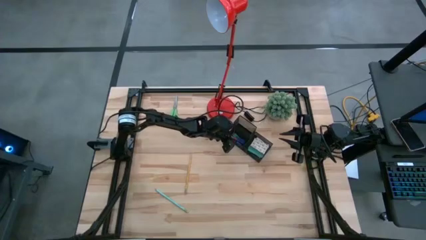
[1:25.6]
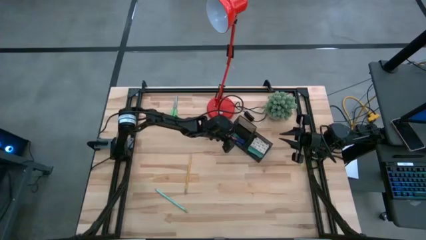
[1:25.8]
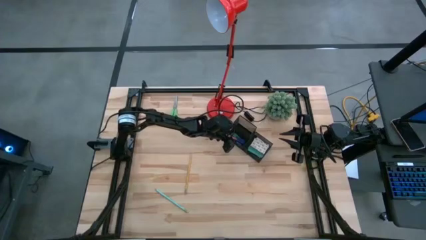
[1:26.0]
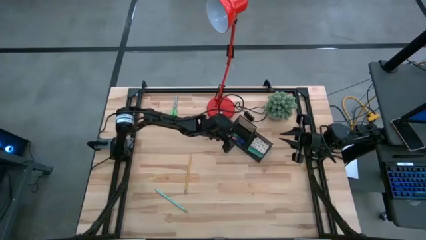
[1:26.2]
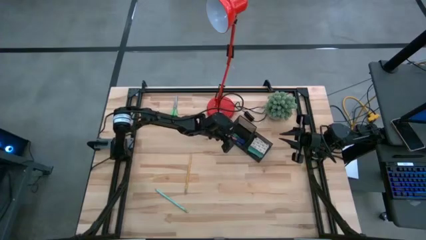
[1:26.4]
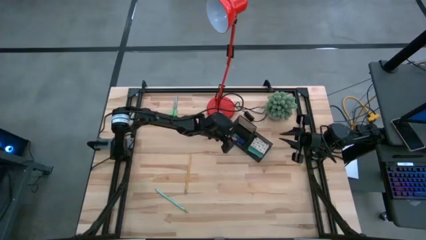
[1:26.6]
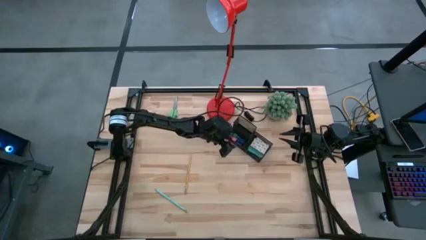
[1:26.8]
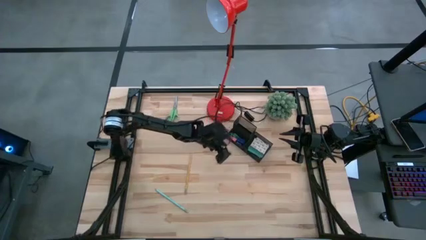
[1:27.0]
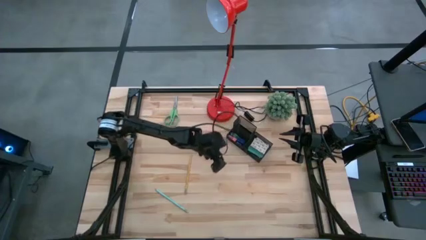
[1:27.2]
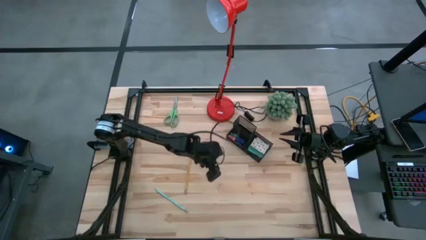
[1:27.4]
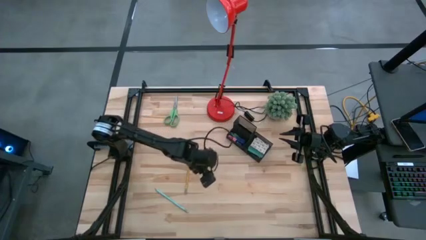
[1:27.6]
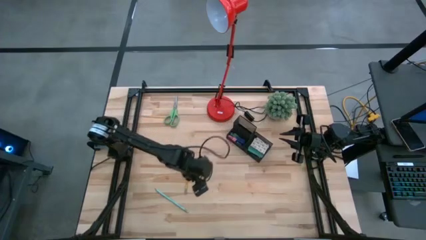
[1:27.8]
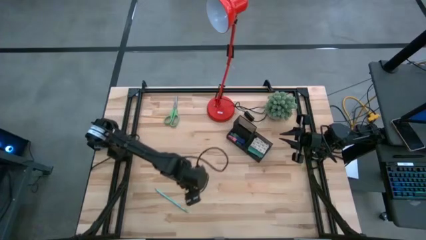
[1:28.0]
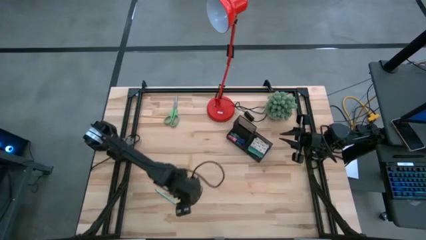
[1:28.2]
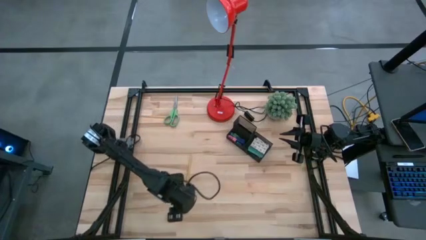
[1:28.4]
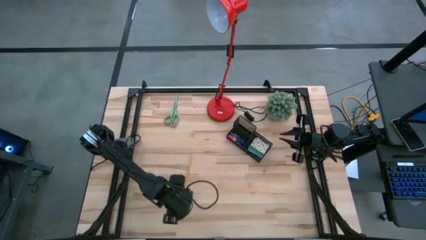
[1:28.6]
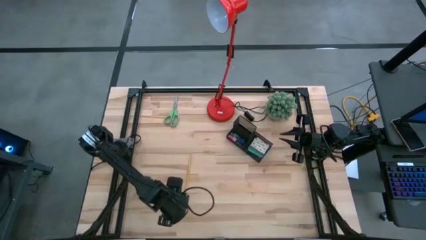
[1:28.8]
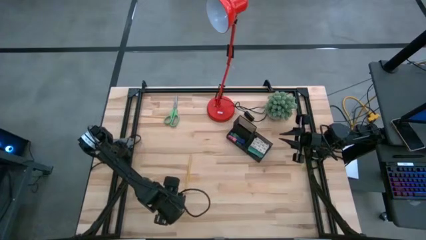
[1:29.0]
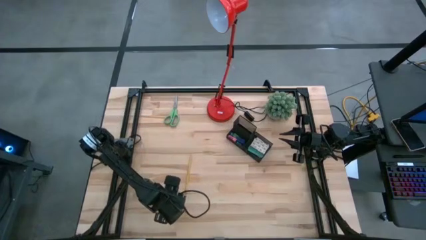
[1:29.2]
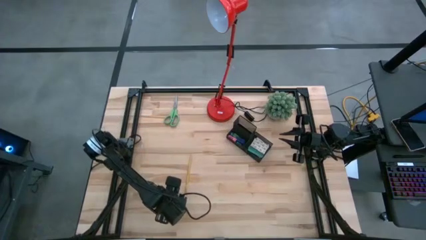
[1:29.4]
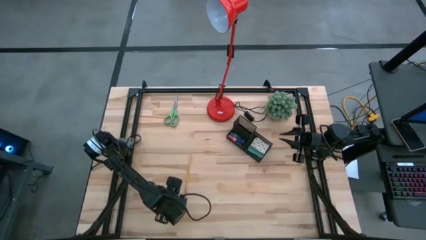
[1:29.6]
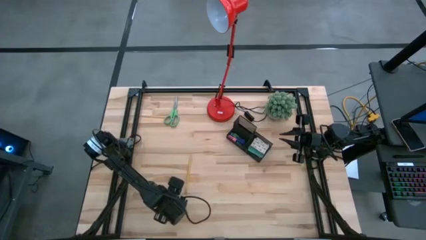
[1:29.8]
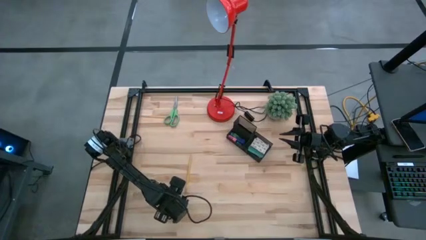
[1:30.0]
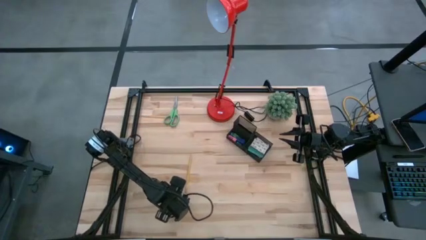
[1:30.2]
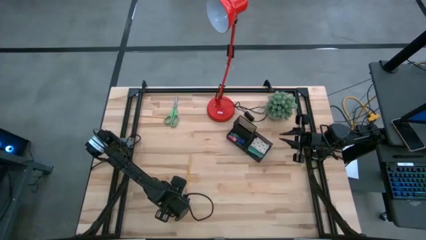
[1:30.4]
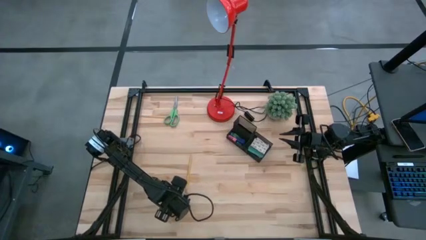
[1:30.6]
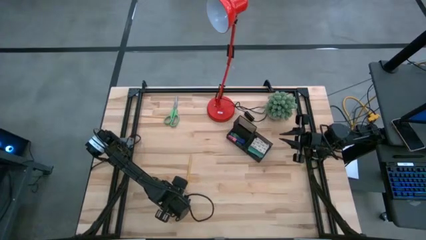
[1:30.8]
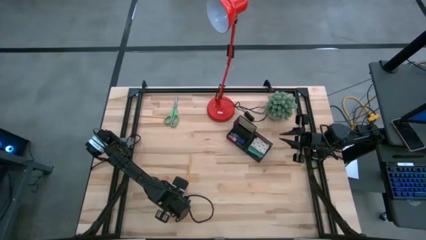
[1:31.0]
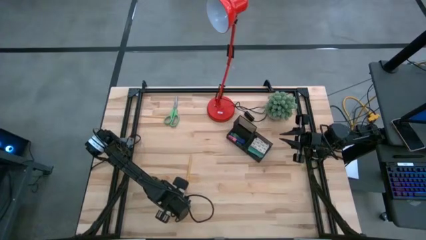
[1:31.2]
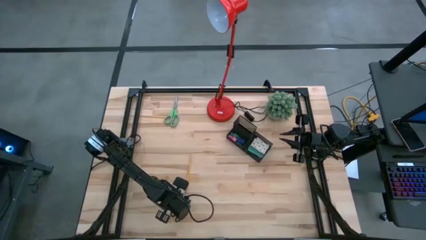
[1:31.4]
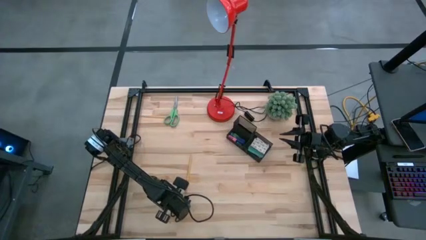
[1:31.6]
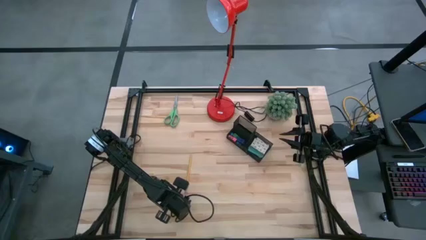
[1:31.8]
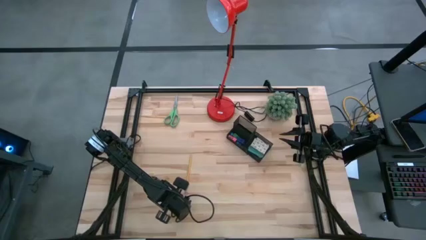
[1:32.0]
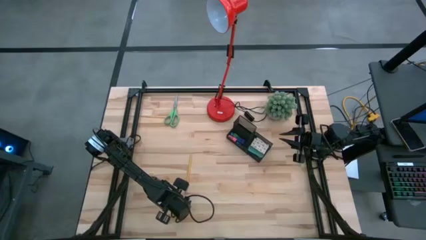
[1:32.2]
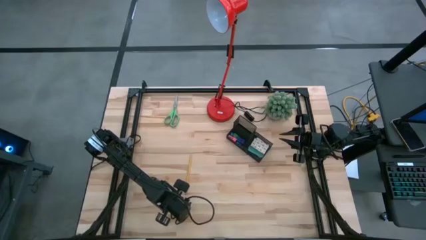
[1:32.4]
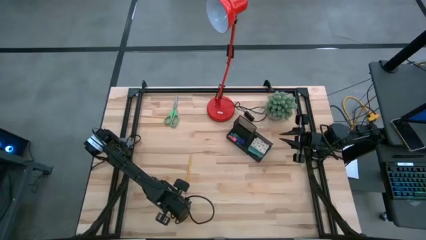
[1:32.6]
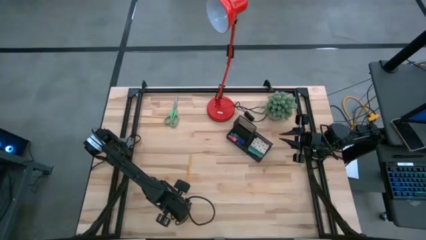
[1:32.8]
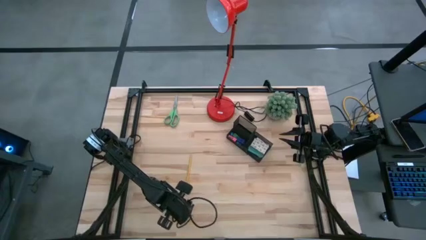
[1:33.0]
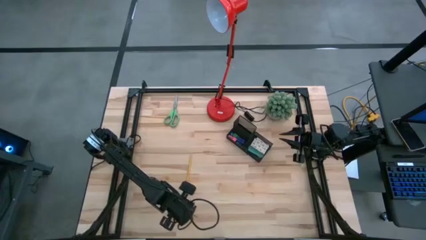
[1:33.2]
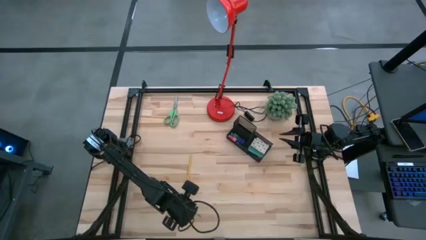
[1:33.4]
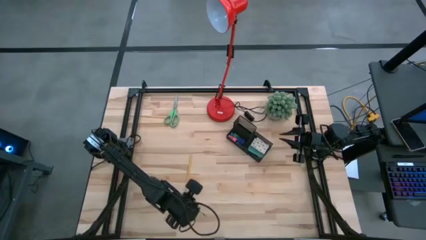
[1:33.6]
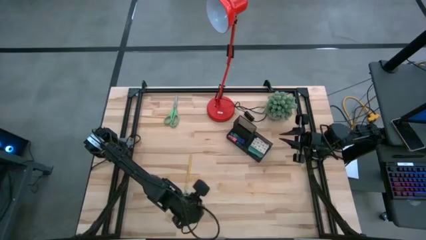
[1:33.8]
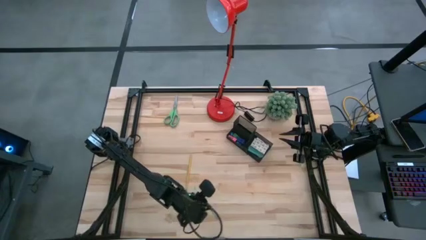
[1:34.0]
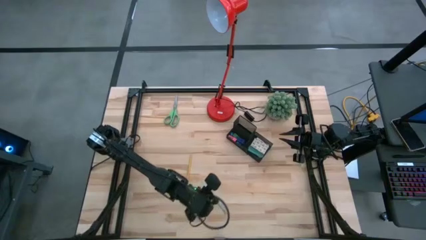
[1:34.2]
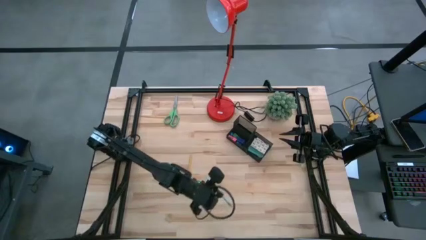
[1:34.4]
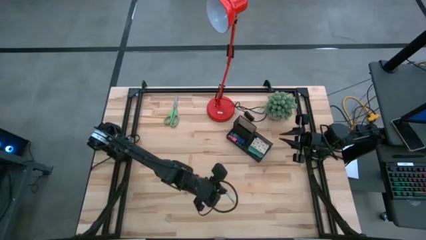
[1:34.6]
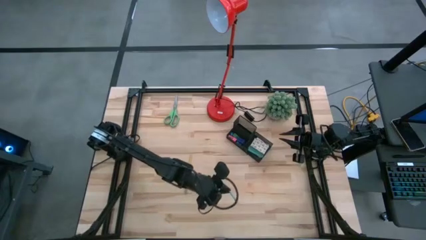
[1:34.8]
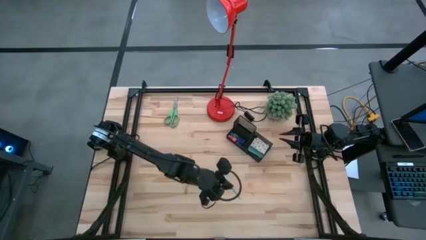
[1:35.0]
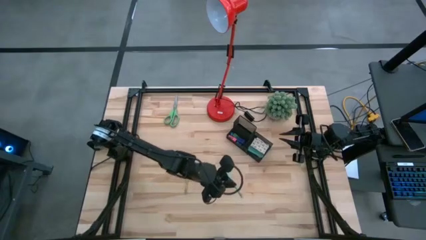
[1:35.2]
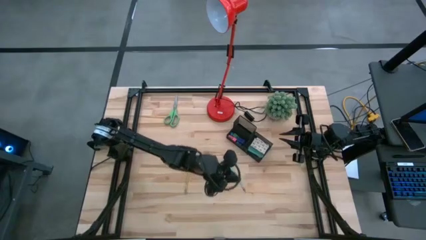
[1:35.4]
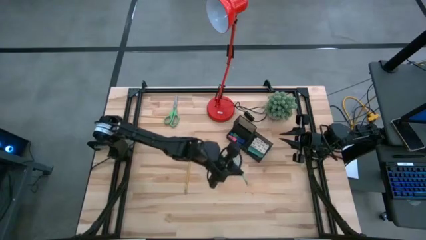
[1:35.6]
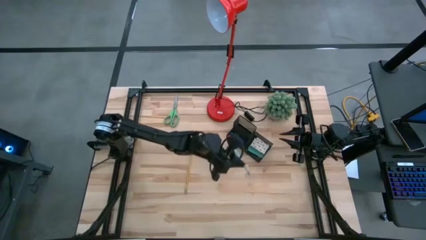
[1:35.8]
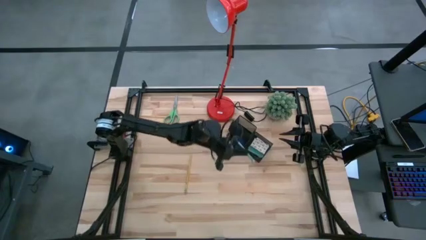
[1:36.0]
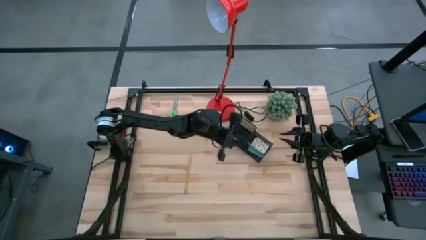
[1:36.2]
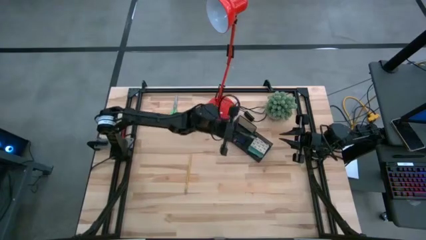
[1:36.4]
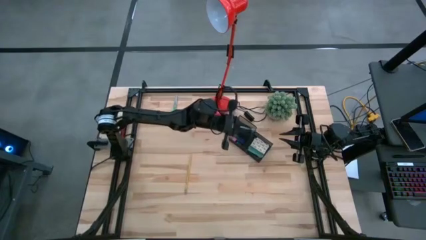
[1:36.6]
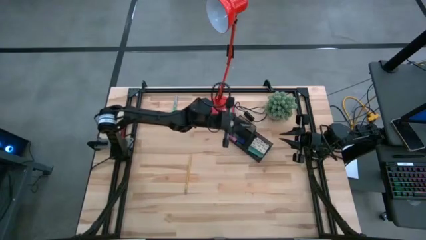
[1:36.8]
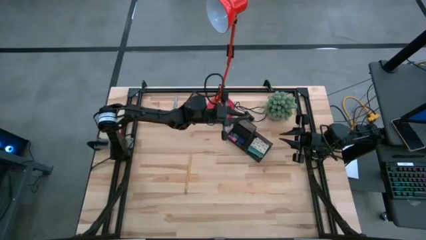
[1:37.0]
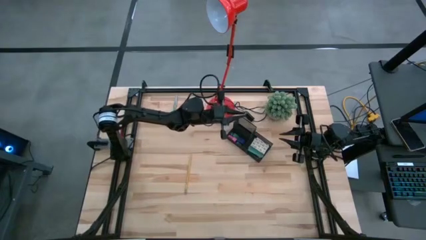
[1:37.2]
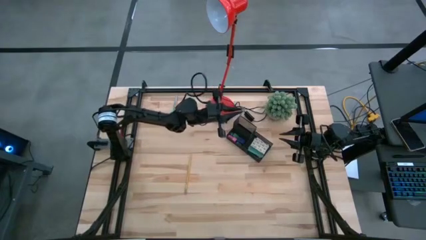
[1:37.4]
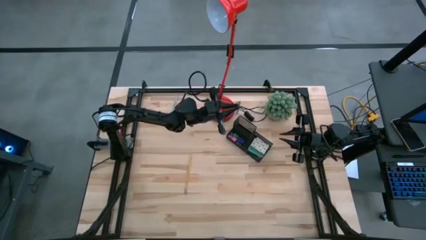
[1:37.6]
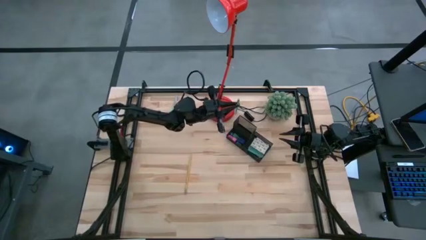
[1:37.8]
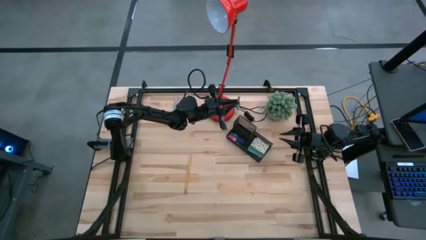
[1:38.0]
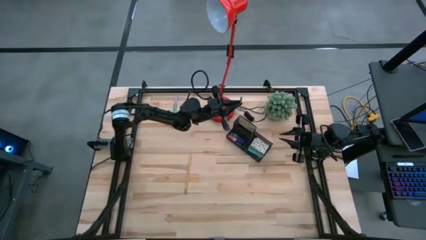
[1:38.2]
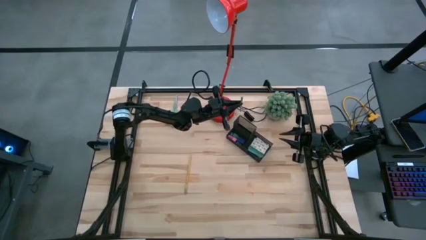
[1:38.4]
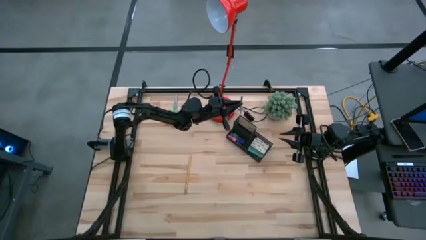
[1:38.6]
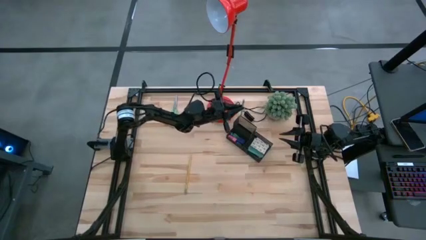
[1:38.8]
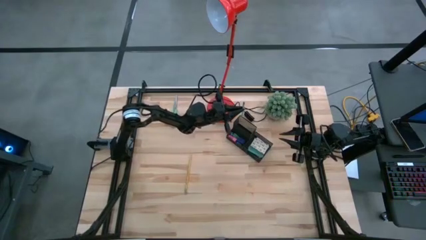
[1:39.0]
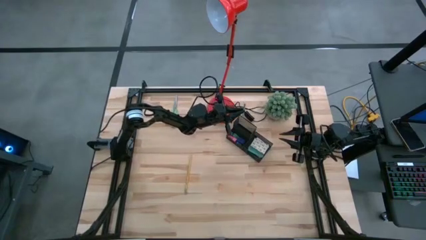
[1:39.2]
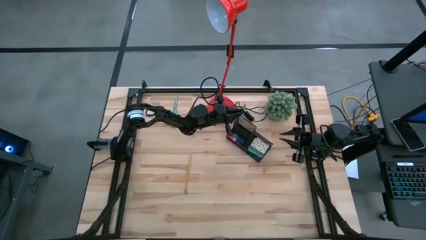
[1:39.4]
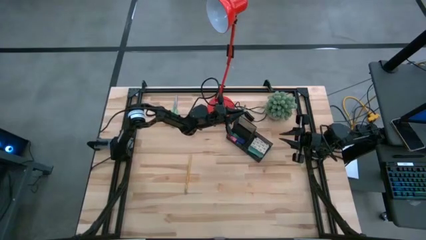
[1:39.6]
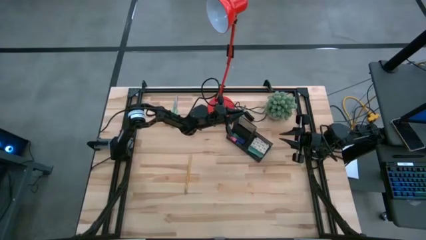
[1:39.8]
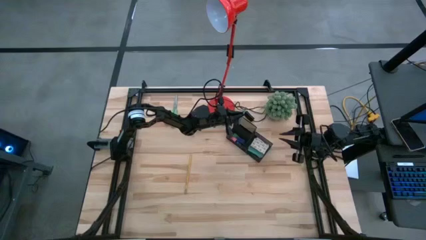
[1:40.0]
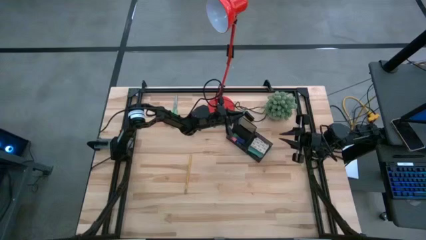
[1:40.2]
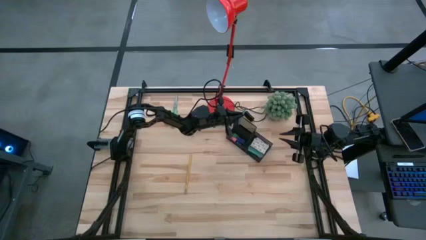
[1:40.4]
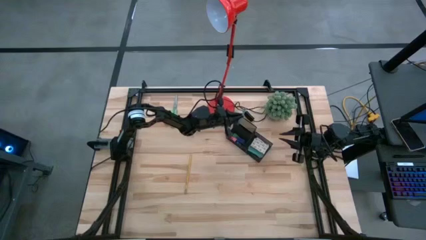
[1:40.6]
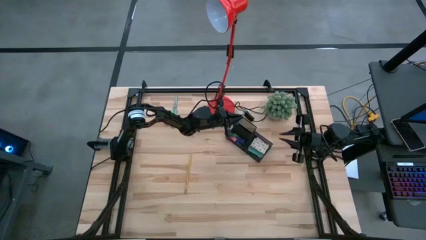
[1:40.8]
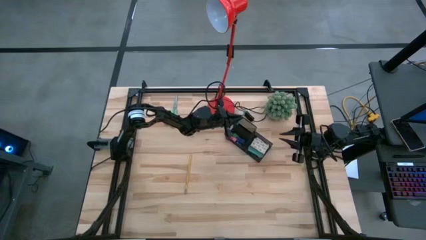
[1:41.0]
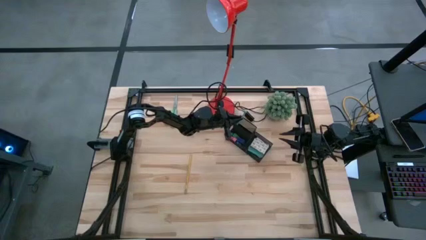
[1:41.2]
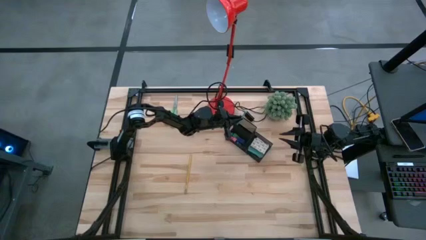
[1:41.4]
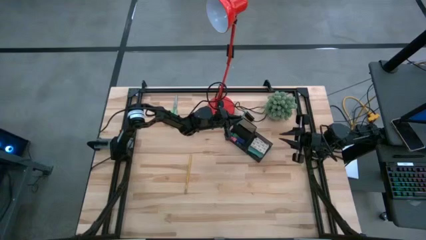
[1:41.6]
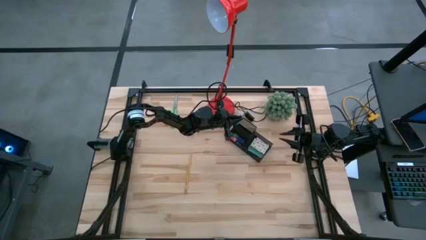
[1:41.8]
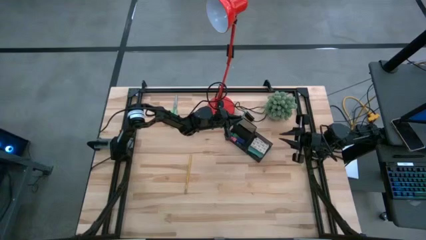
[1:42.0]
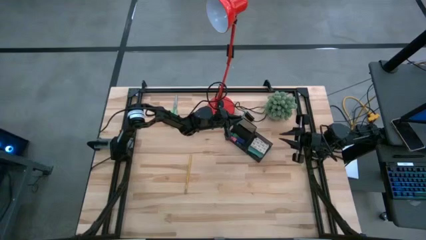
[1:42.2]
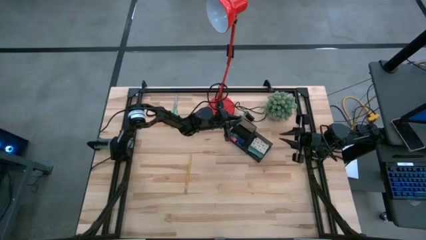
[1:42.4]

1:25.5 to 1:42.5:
Task: Pick and place office supplies into organizer
Put the blue pencil into the desk organizer
